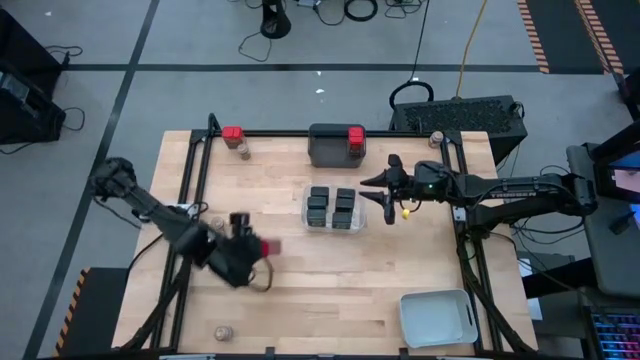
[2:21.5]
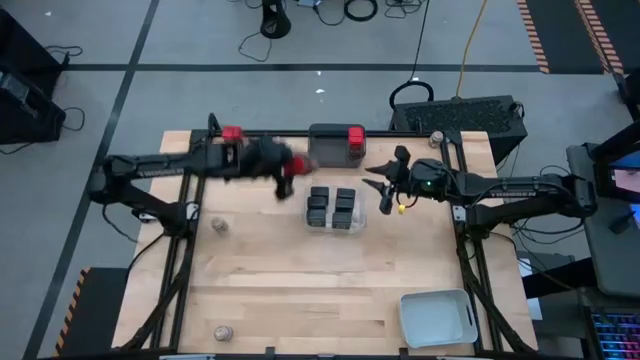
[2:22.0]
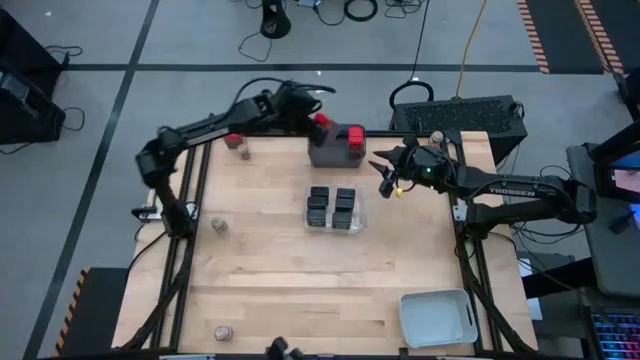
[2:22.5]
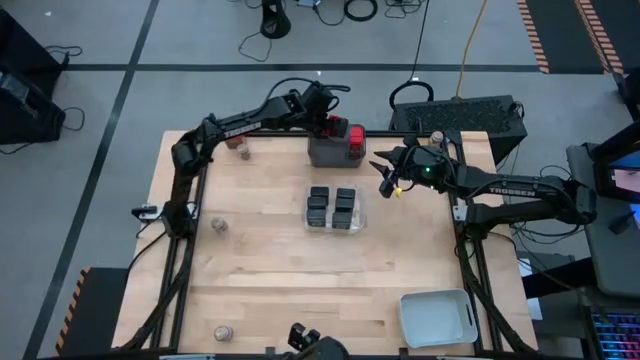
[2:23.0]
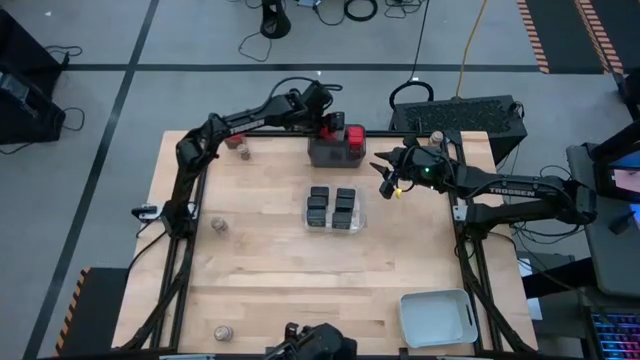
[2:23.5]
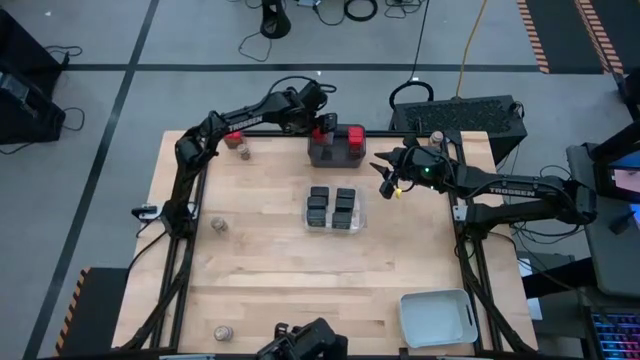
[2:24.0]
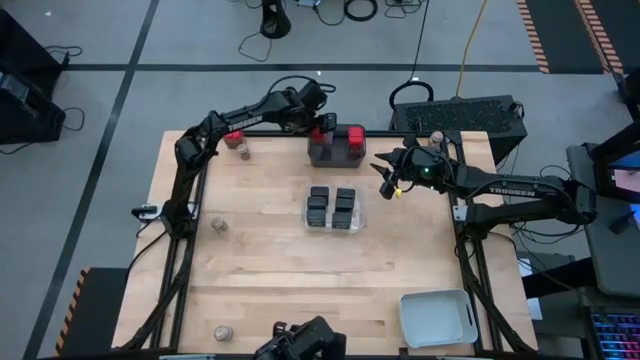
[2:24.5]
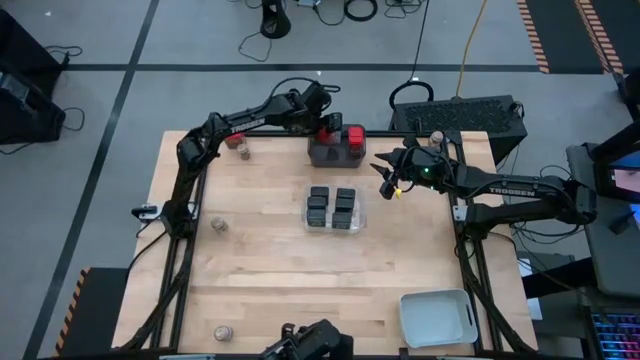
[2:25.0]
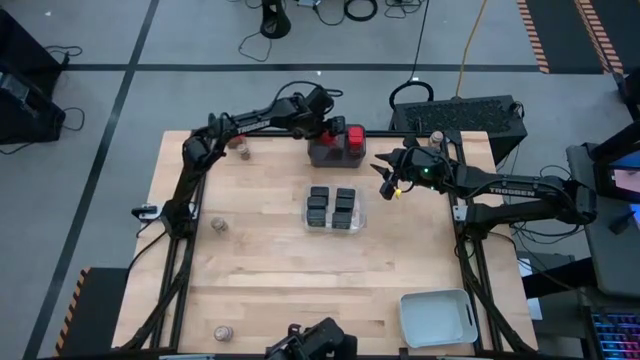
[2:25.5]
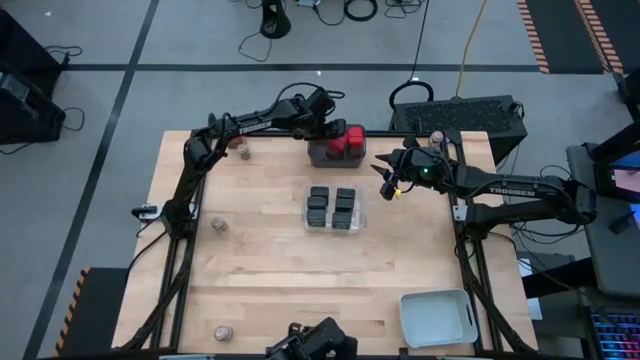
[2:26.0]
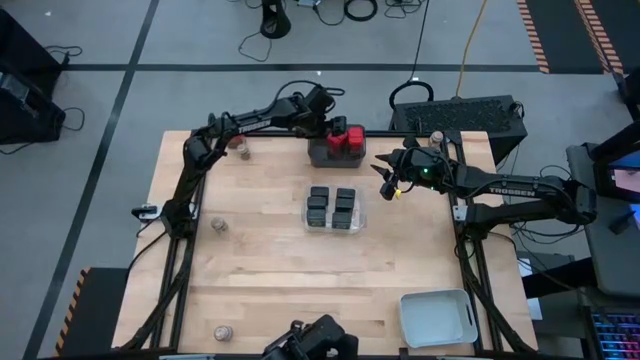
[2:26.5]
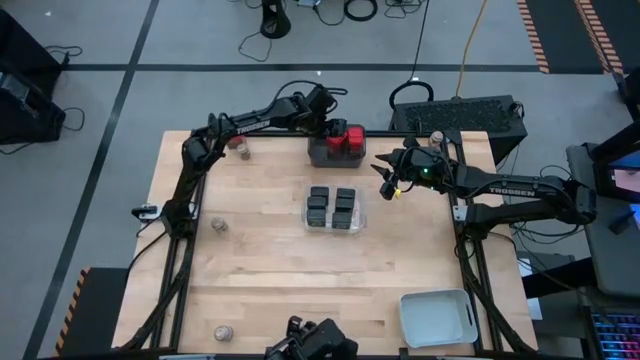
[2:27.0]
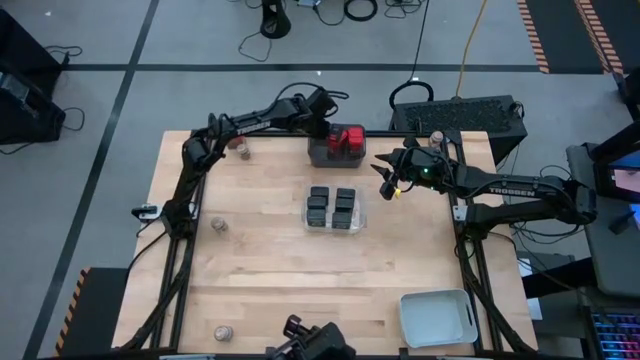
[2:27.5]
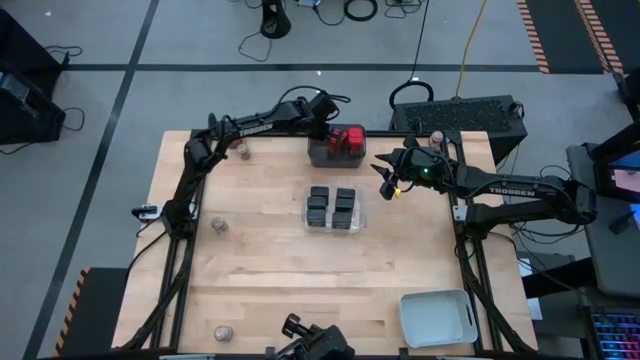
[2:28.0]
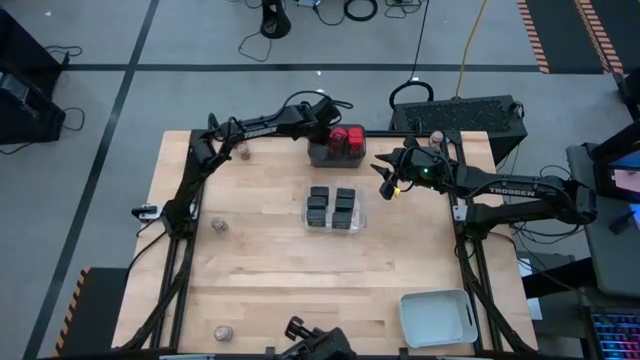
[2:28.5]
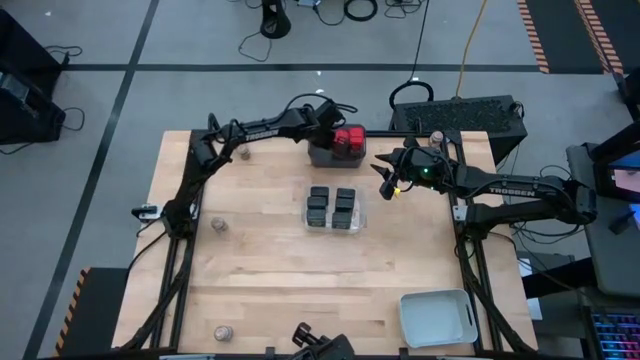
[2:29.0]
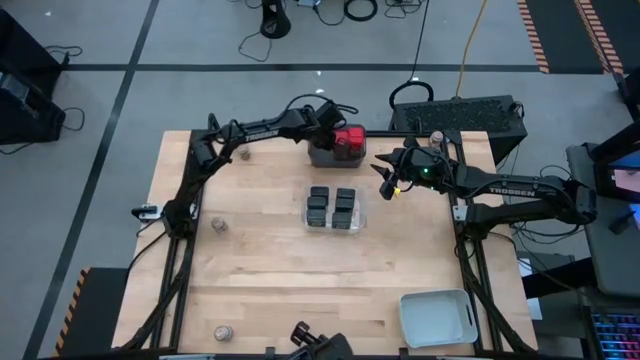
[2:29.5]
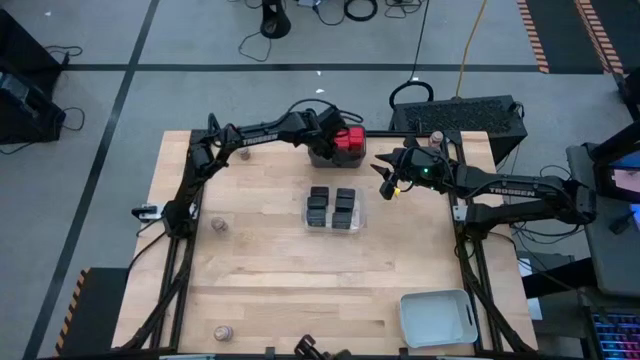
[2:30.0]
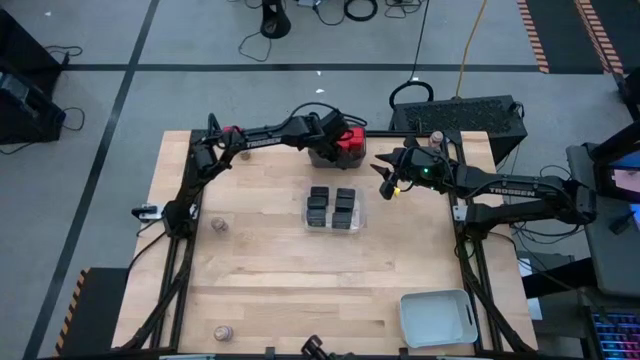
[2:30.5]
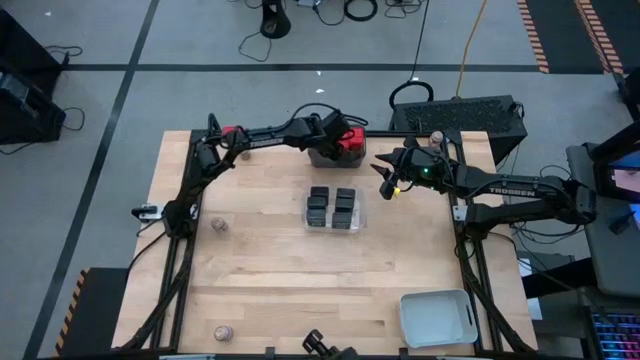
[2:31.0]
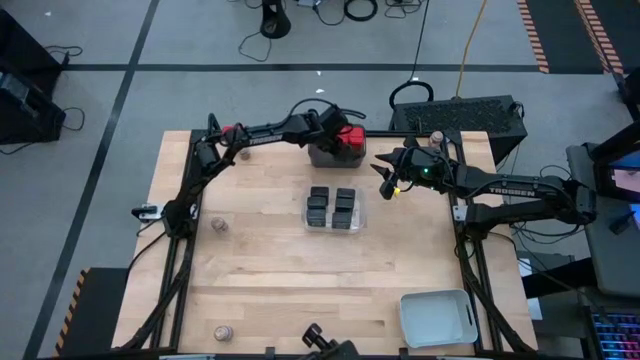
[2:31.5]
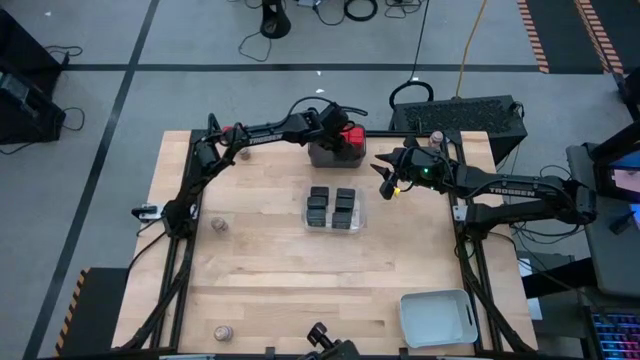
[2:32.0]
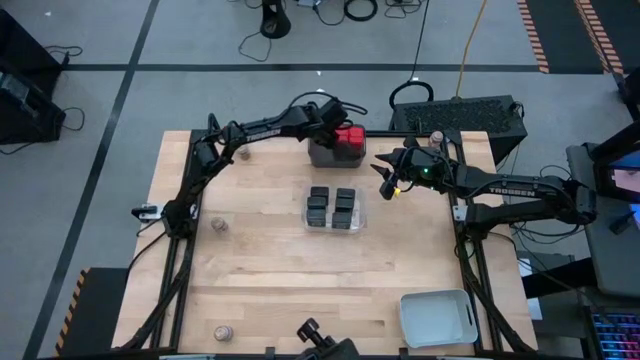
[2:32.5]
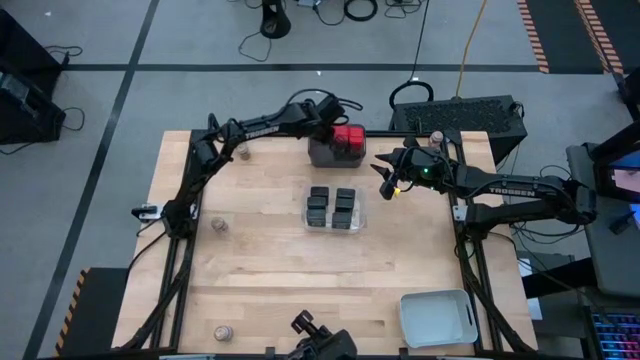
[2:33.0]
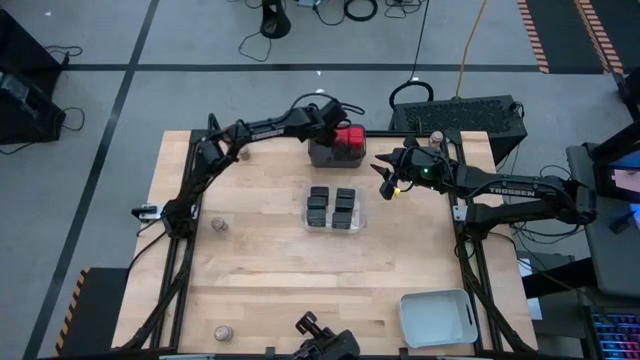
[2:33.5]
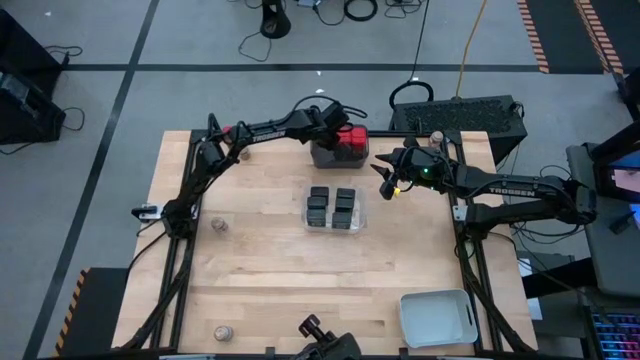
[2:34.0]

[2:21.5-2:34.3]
Task: Sort spices by type
Put the red seasoning bottle into the gray bin

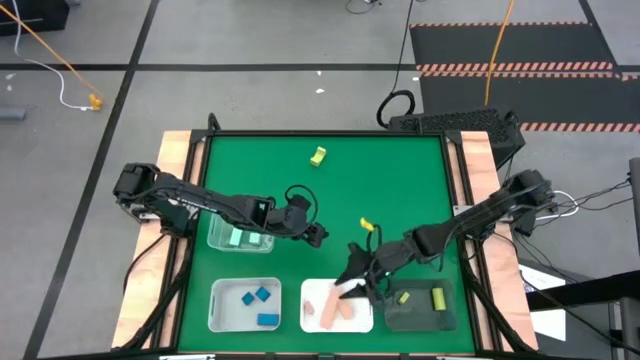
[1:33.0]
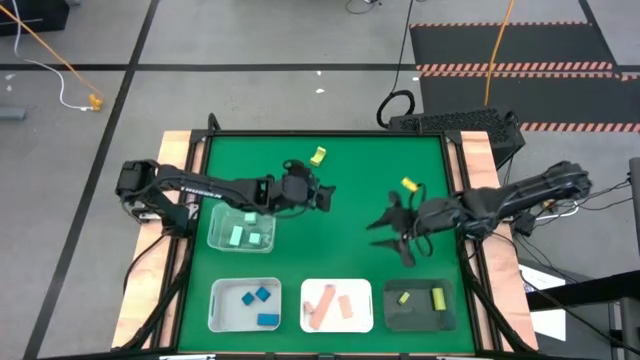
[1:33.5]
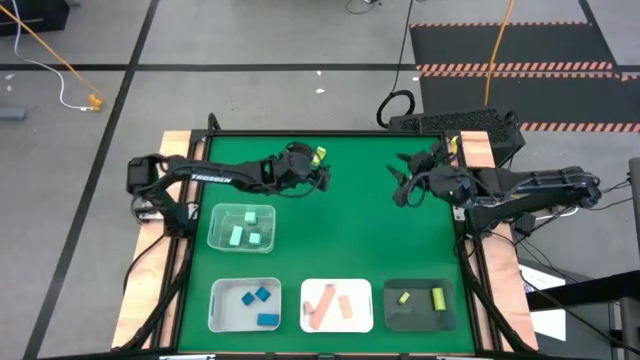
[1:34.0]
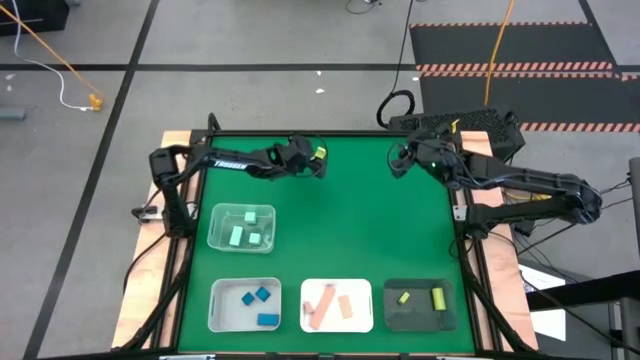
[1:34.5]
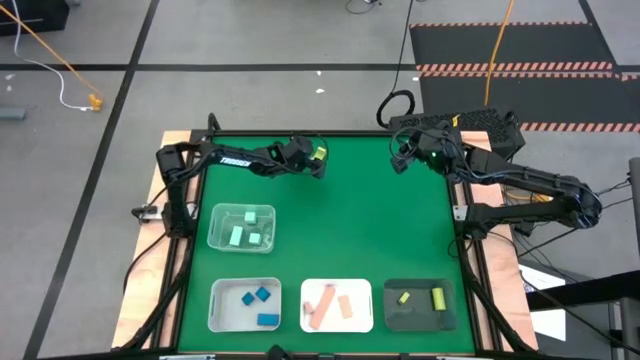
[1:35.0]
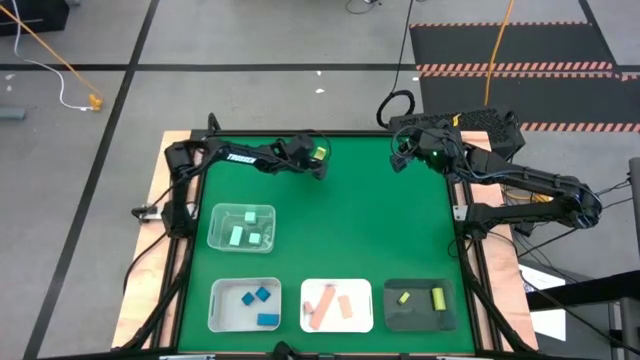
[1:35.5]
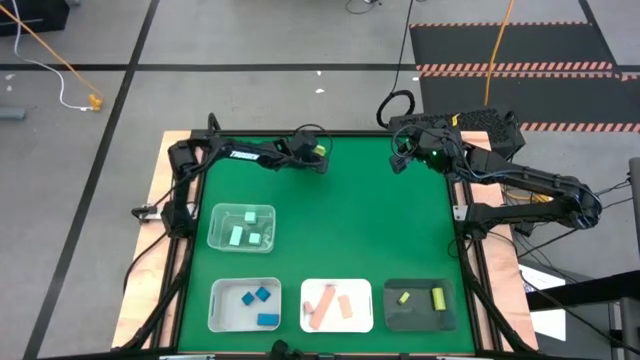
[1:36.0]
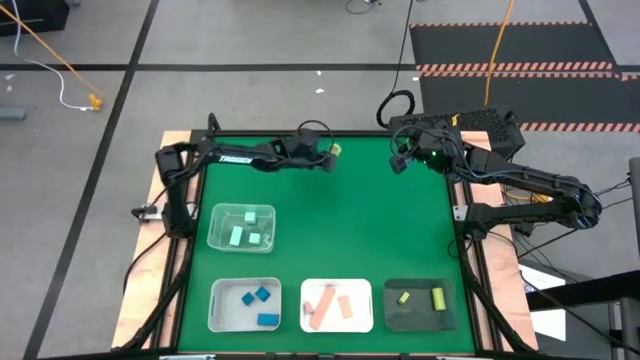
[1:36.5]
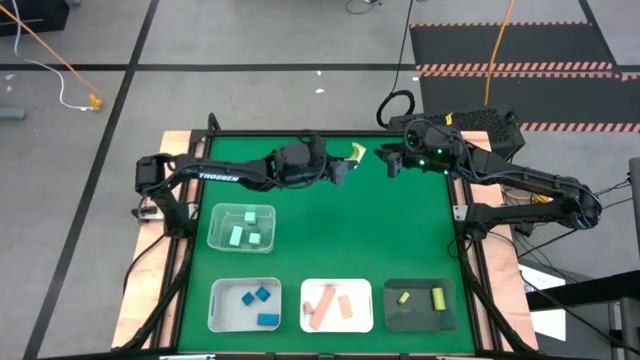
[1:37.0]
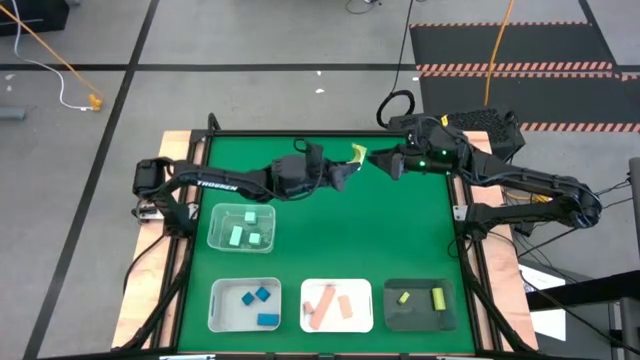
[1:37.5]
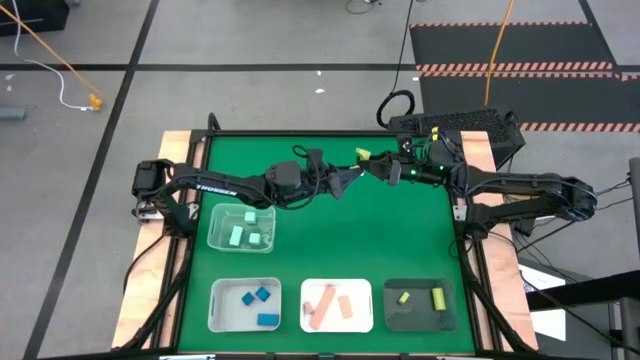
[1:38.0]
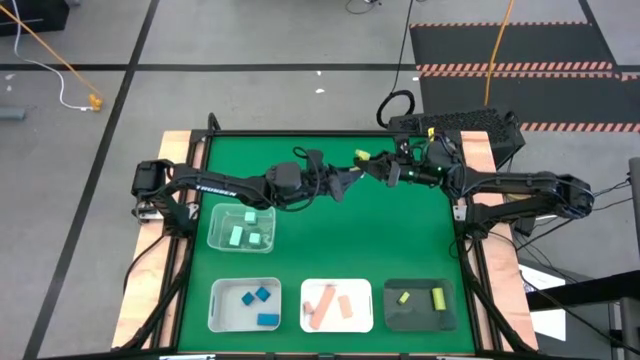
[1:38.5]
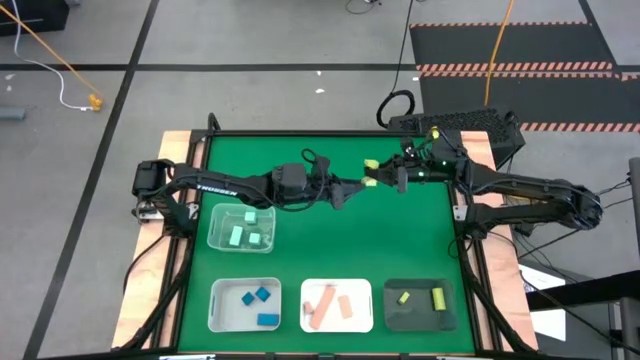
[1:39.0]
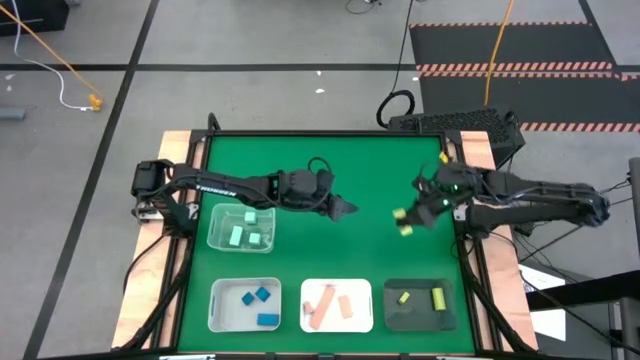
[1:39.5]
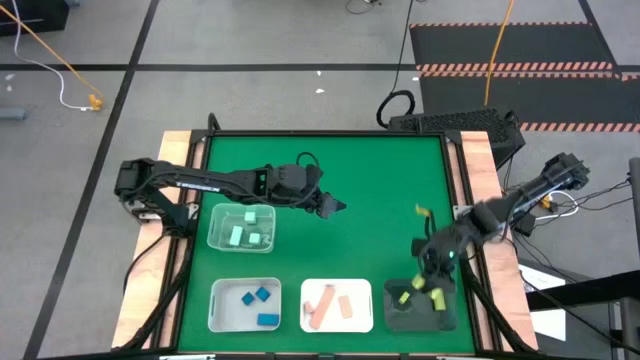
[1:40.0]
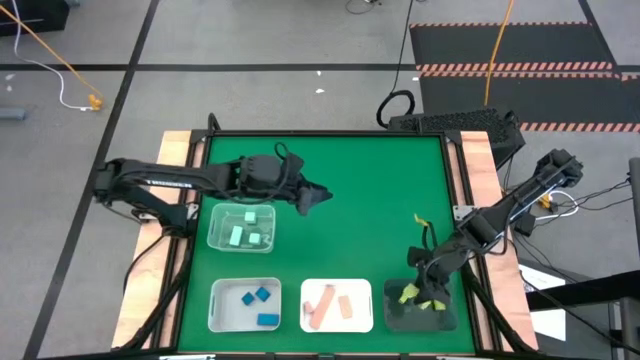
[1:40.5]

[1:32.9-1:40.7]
Task: Sort & place blocks by color
Put the green block into the black bin
